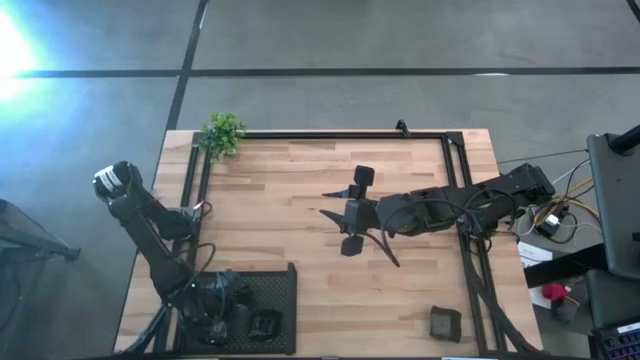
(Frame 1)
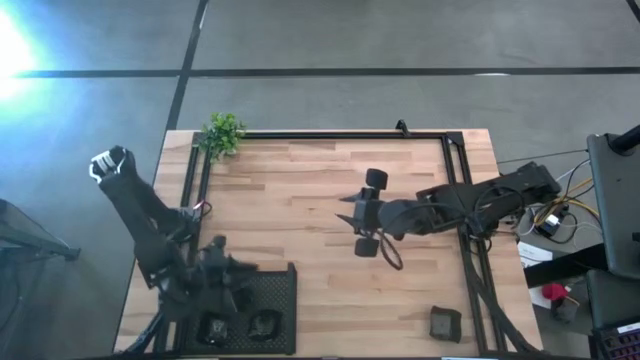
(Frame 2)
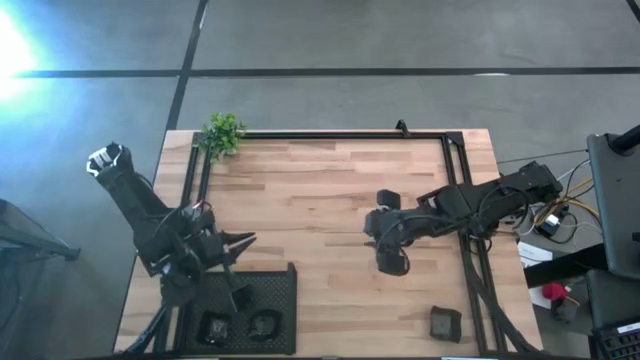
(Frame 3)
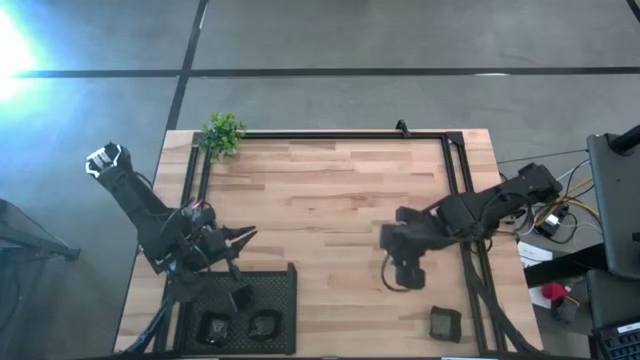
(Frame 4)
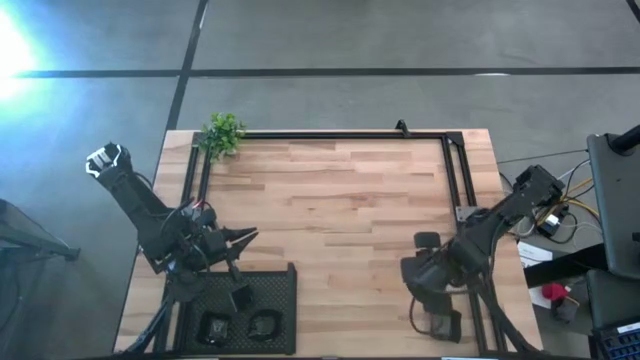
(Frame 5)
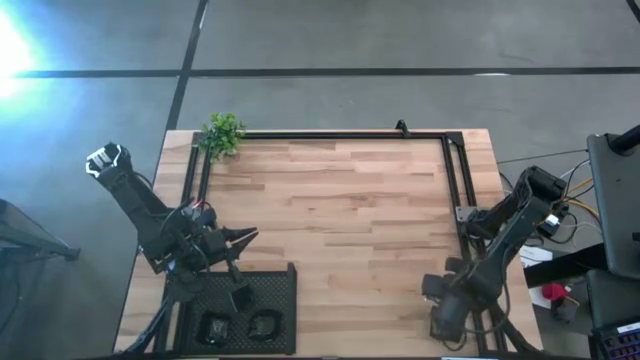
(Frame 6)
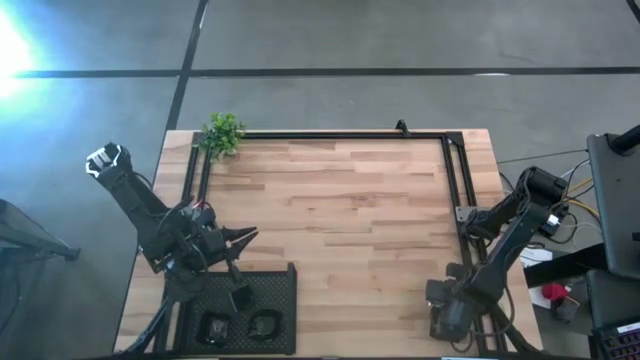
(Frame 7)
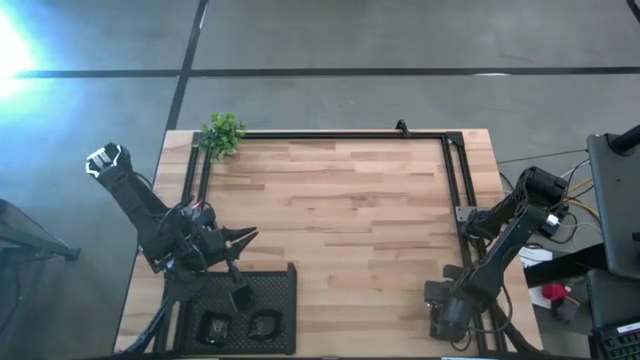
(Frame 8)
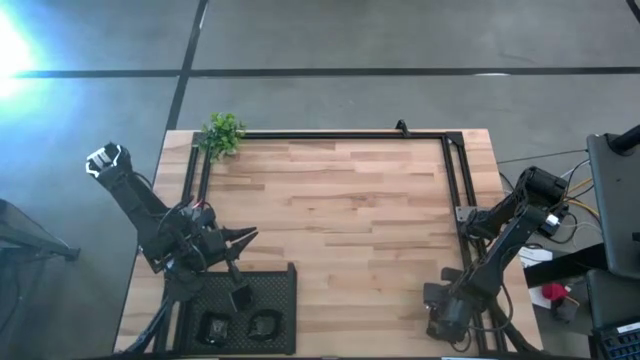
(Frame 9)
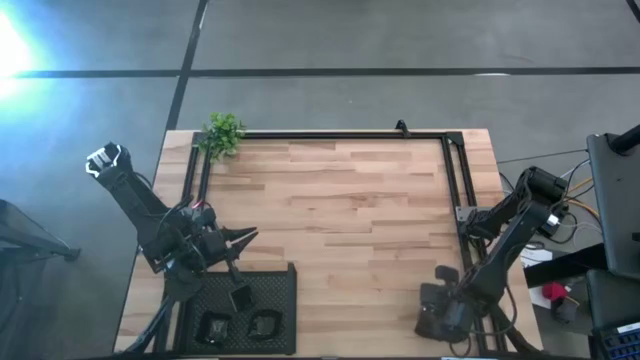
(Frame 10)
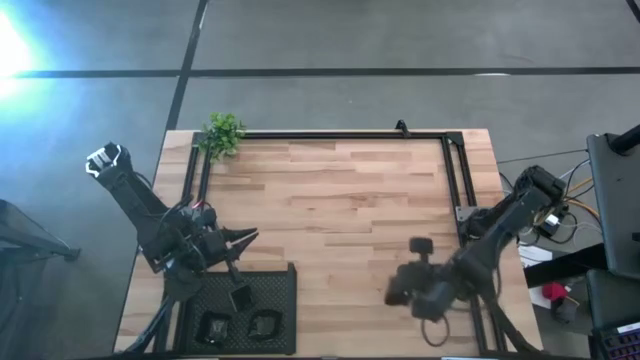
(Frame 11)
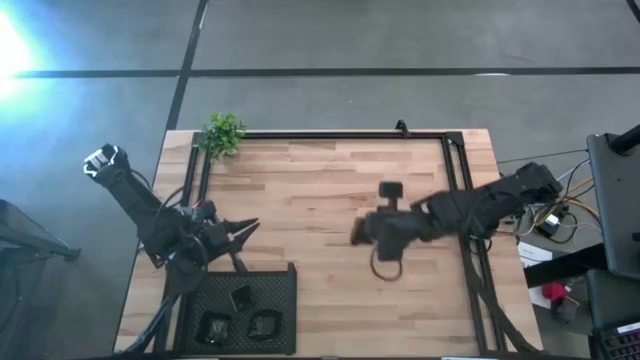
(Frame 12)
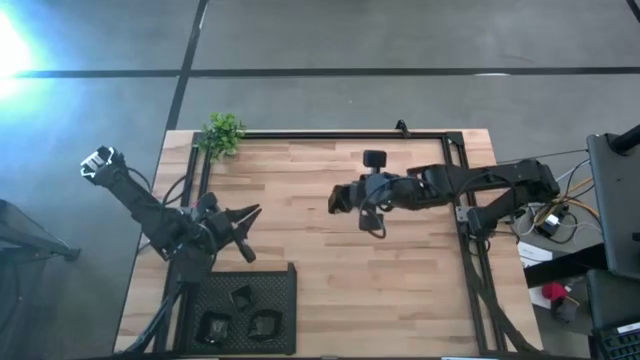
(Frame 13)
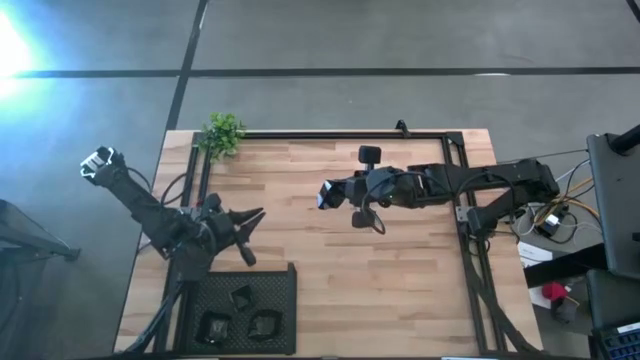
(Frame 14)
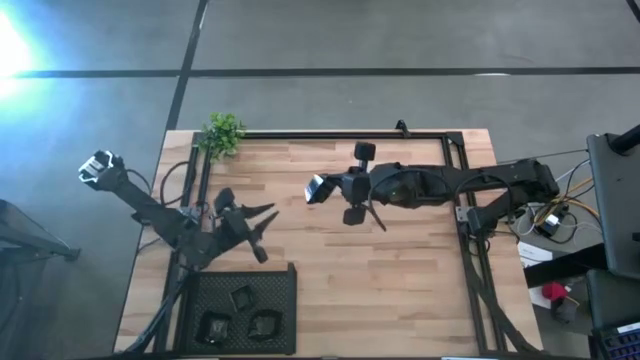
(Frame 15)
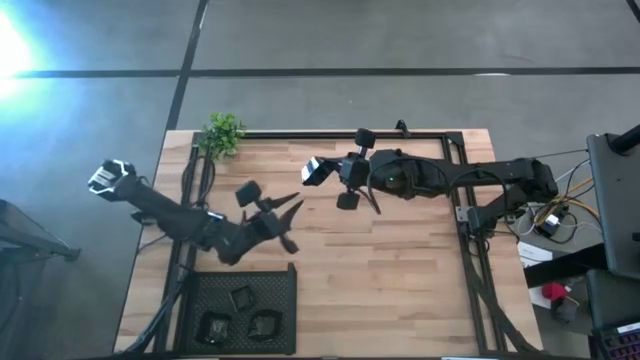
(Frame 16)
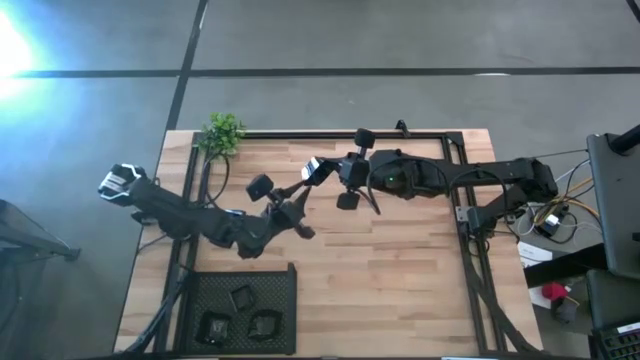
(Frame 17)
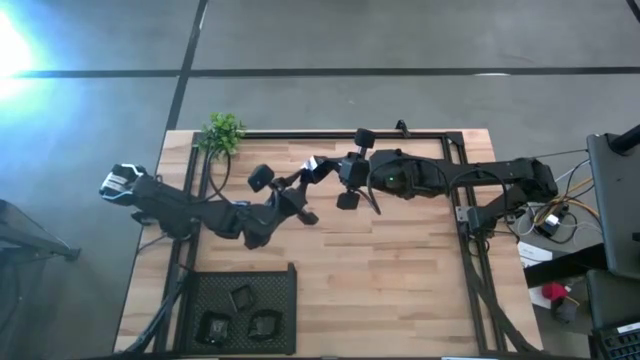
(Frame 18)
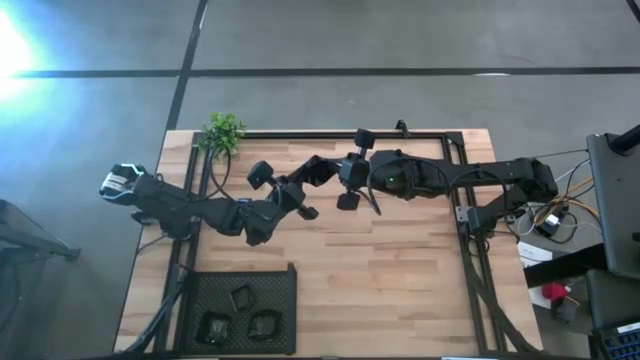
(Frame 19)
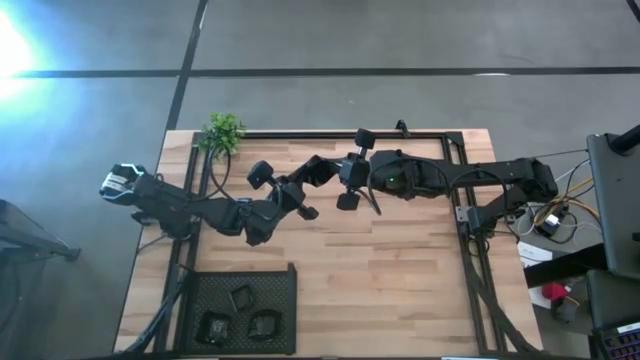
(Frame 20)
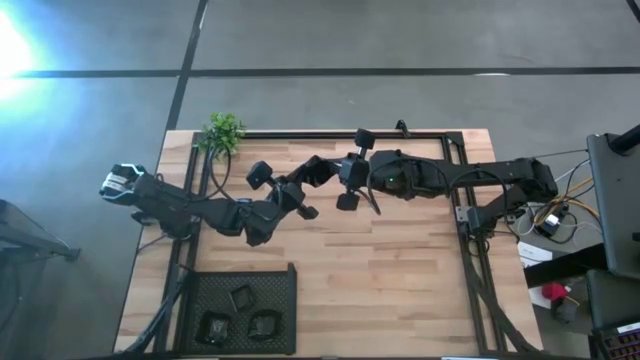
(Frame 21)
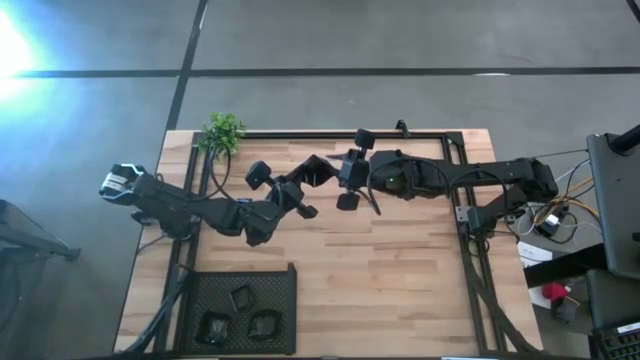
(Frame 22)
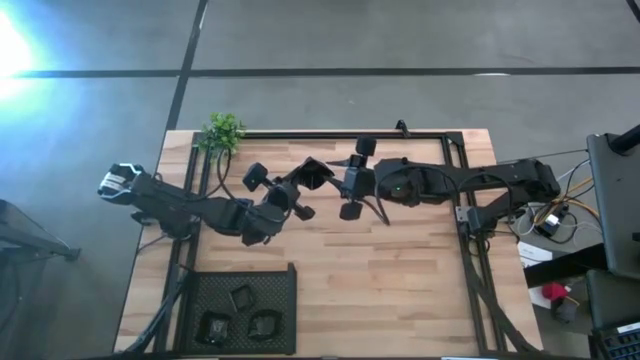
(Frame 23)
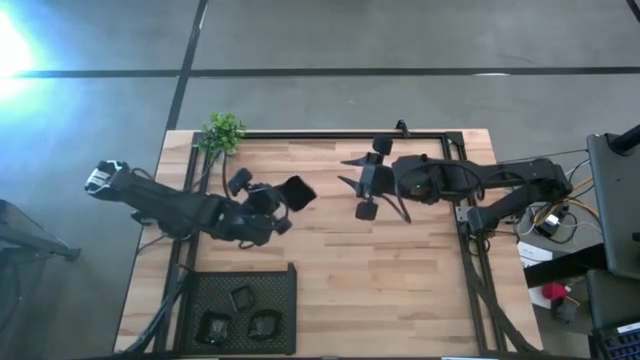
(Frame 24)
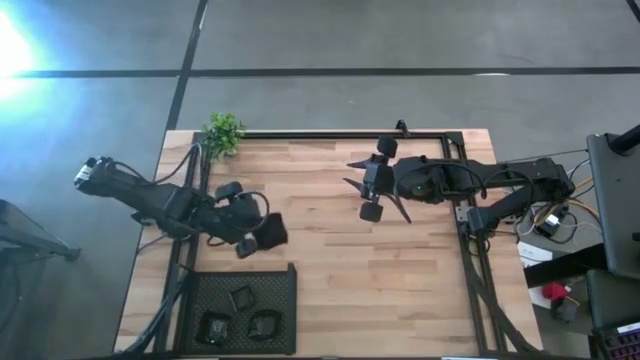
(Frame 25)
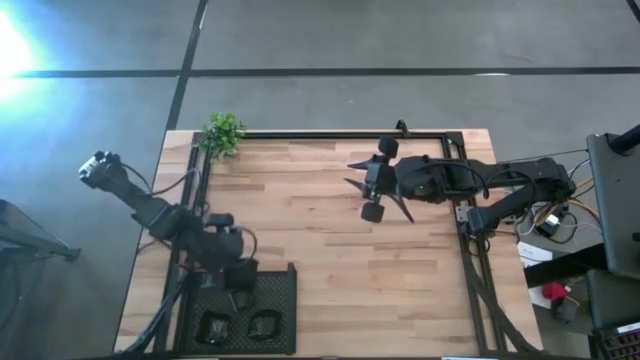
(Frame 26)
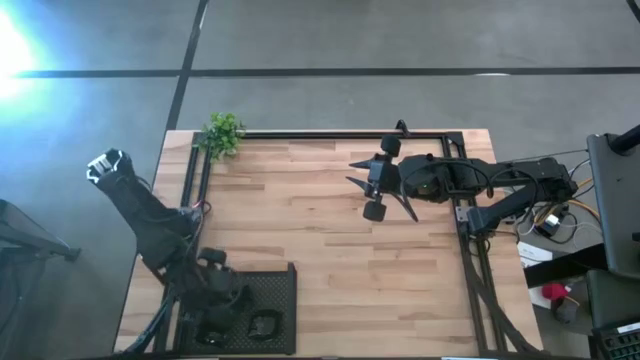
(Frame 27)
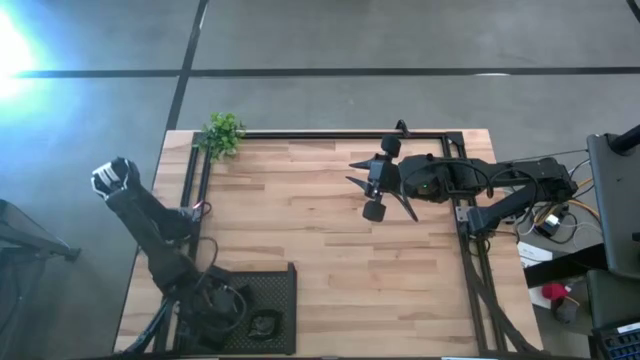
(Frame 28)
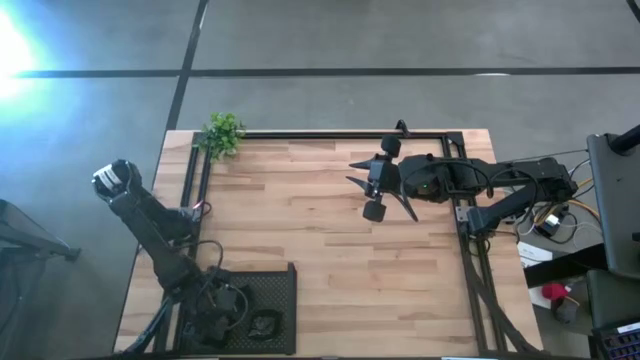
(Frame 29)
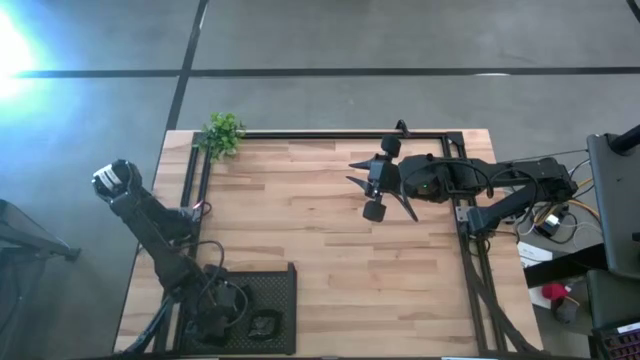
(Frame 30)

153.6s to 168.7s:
Task: Pick & Place Mini shaped plates
Stack the distorted square plate on top of the distorted square plate on the shelf

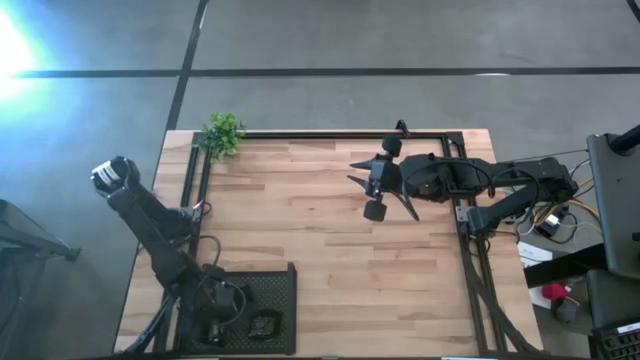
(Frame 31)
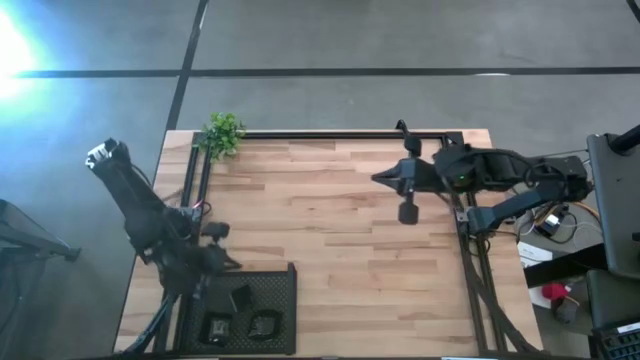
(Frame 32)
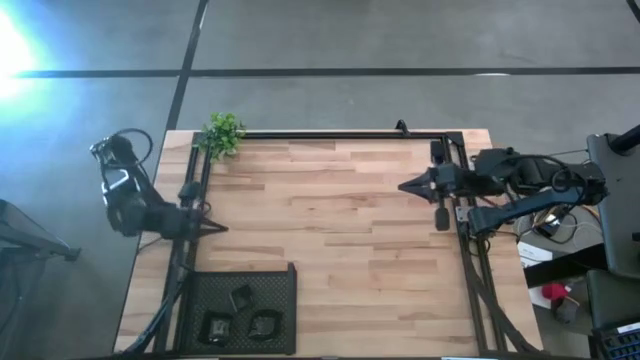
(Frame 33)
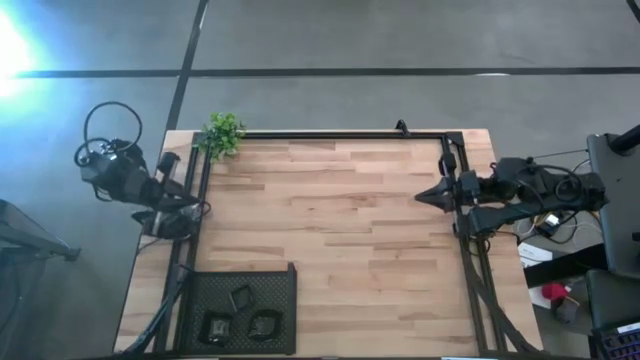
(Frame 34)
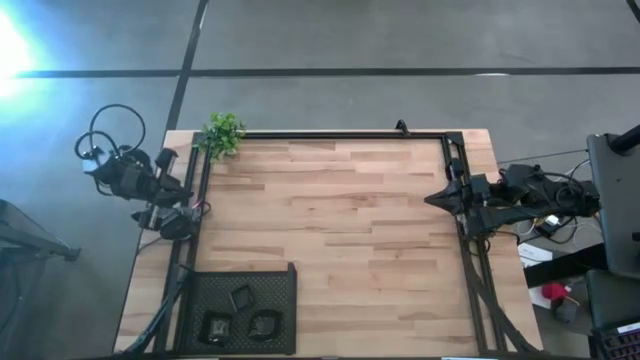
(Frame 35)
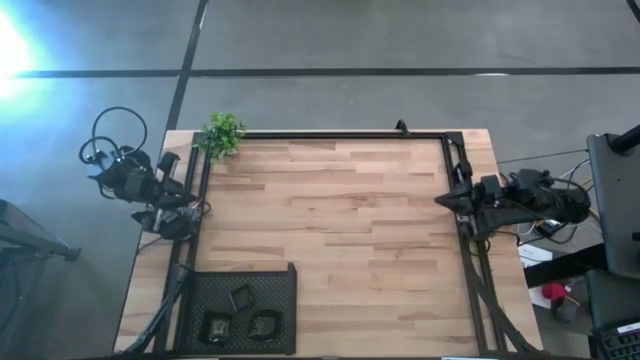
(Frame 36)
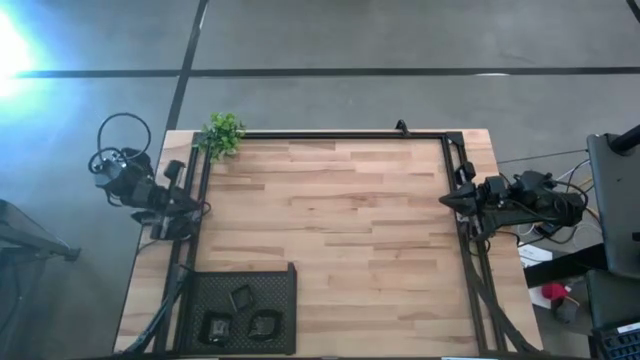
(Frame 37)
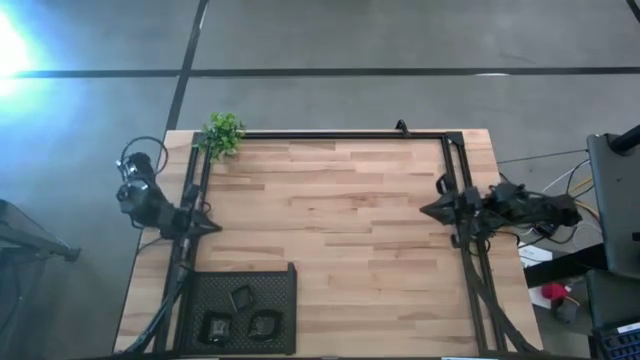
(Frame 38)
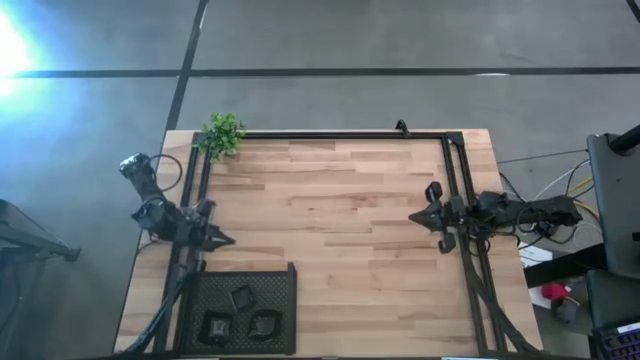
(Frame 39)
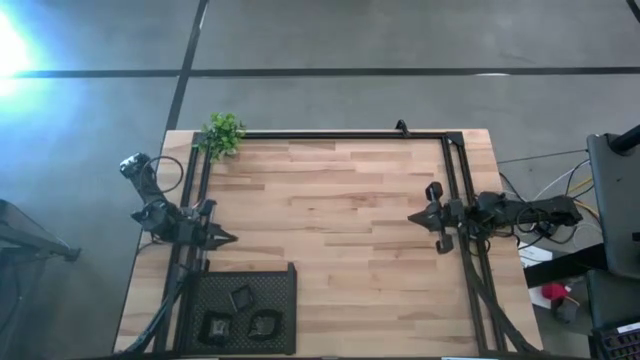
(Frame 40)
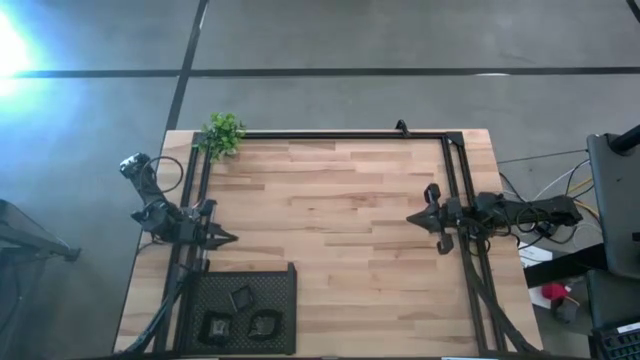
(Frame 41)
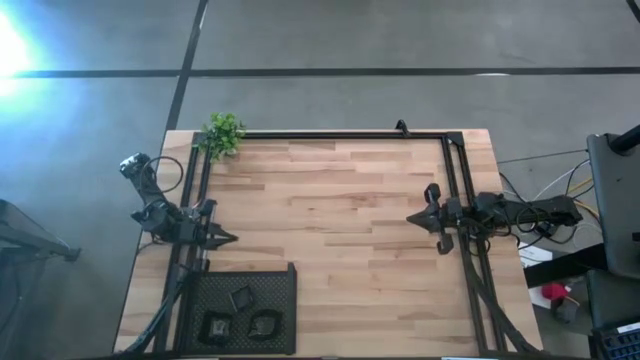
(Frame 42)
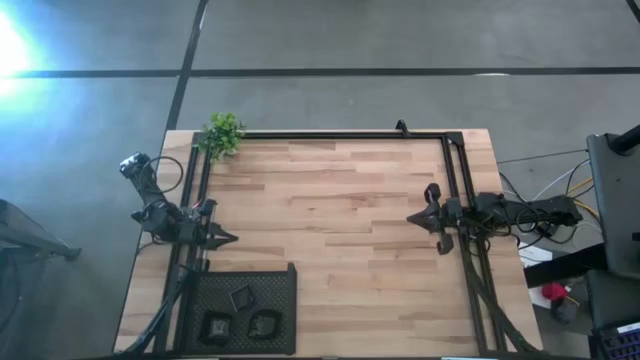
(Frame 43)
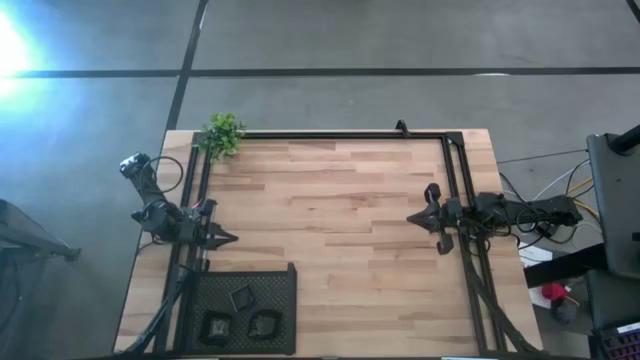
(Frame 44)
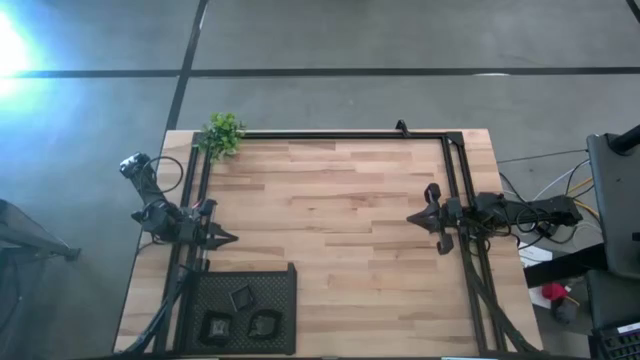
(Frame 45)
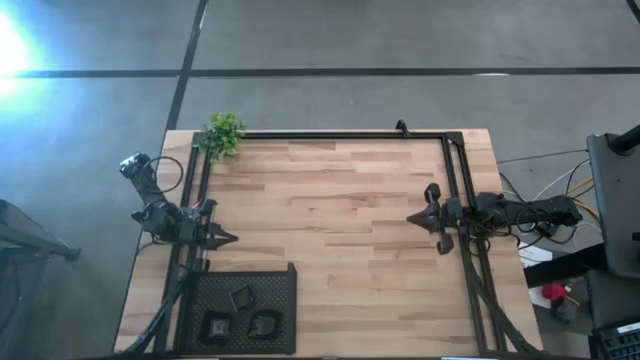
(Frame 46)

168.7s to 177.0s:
Return to Home Position
